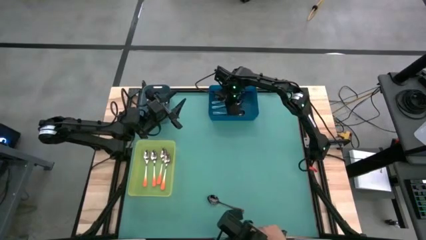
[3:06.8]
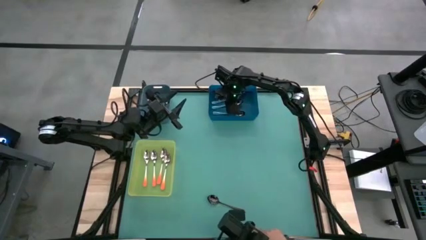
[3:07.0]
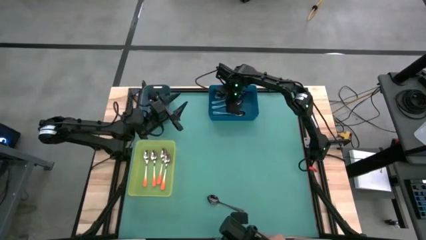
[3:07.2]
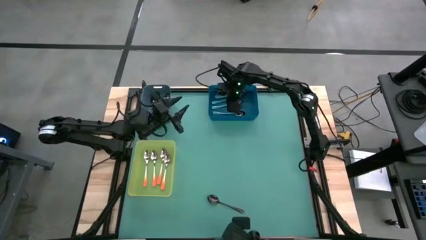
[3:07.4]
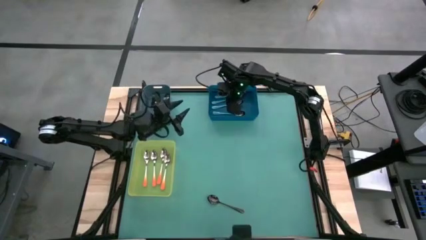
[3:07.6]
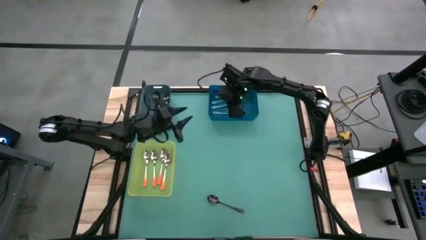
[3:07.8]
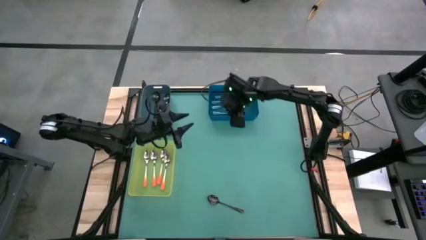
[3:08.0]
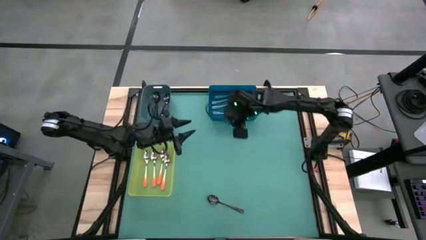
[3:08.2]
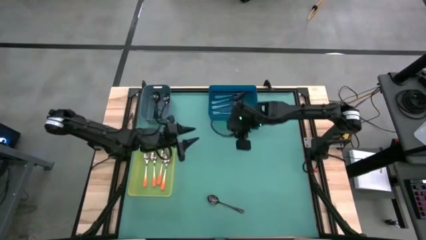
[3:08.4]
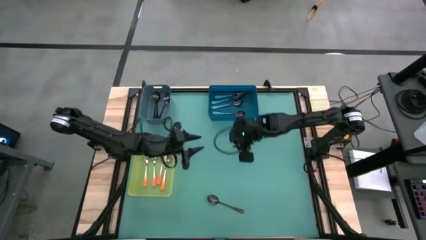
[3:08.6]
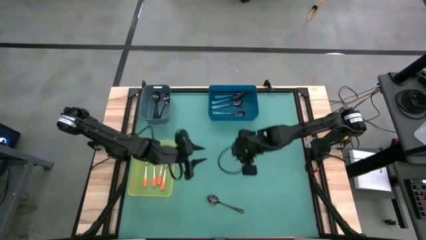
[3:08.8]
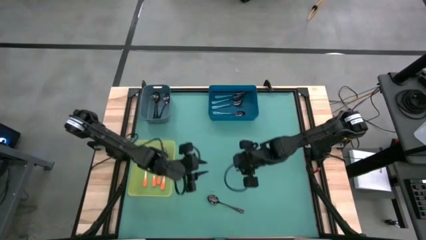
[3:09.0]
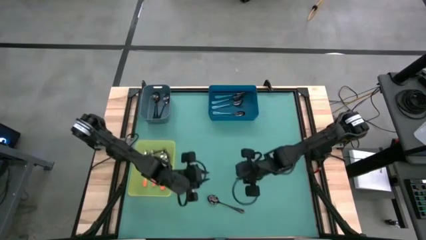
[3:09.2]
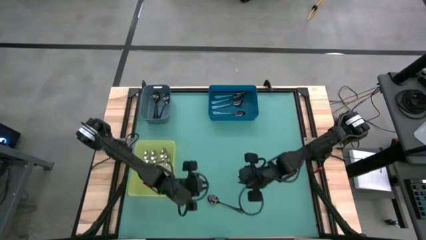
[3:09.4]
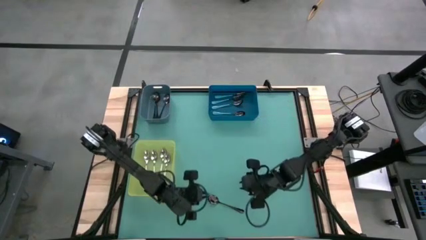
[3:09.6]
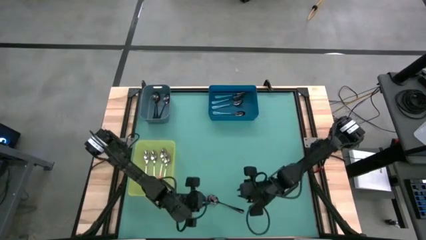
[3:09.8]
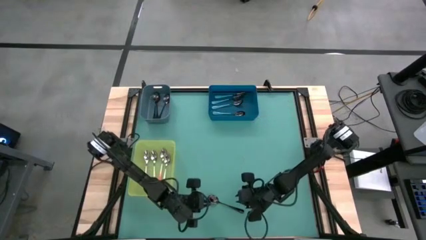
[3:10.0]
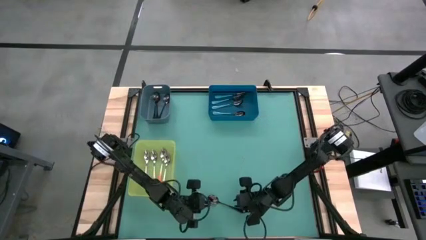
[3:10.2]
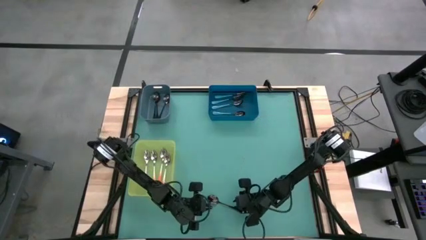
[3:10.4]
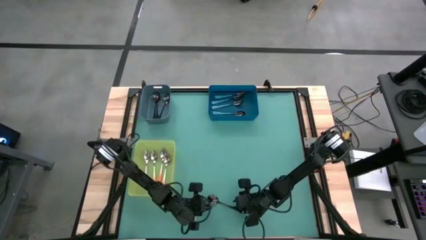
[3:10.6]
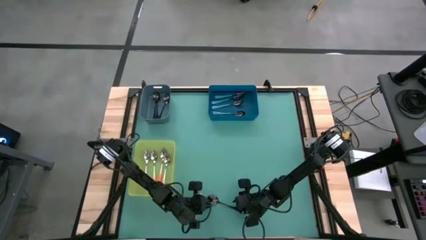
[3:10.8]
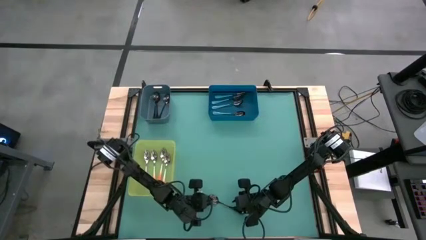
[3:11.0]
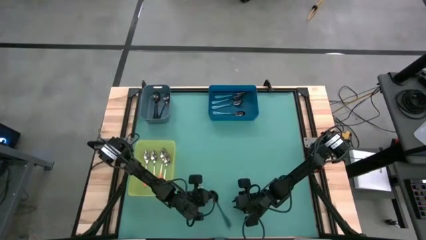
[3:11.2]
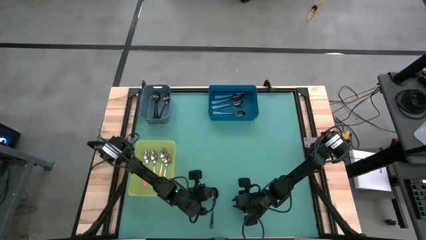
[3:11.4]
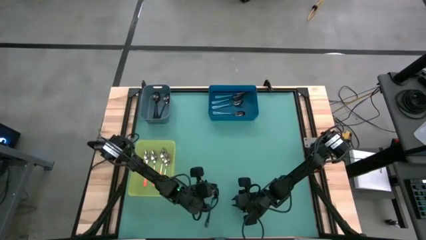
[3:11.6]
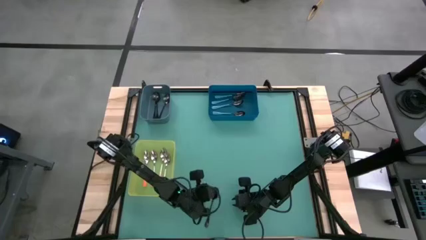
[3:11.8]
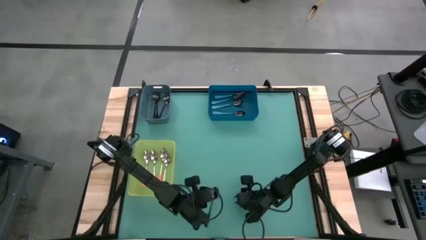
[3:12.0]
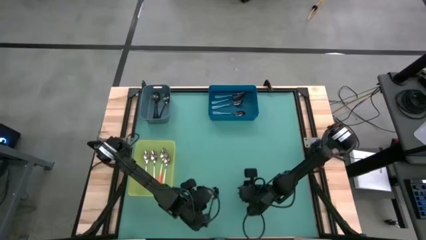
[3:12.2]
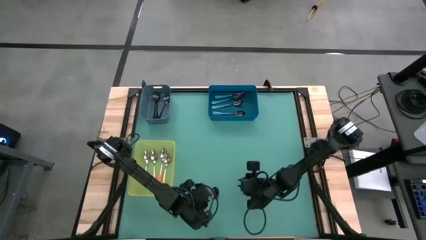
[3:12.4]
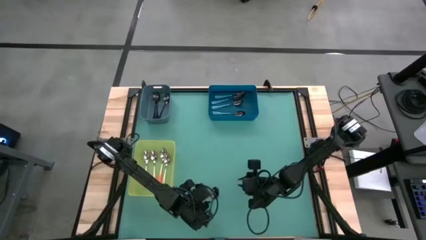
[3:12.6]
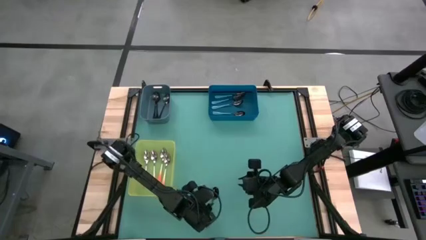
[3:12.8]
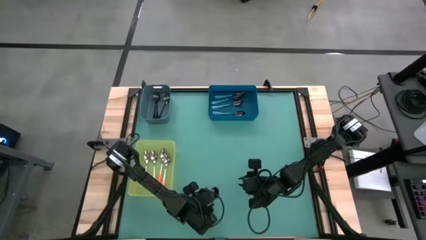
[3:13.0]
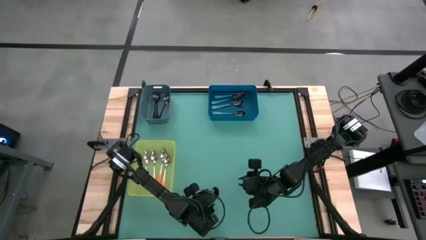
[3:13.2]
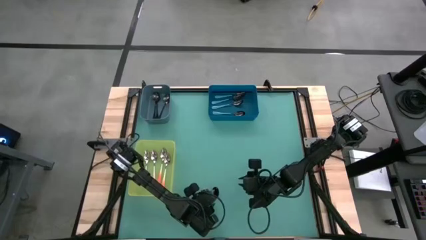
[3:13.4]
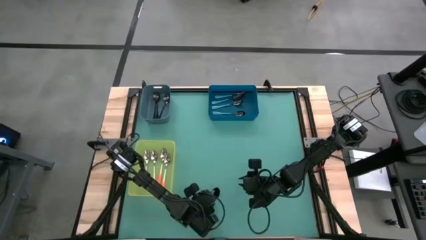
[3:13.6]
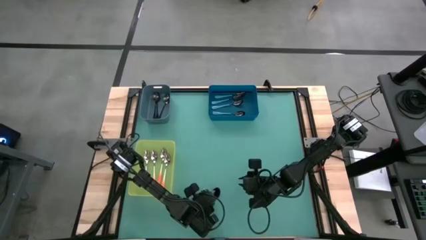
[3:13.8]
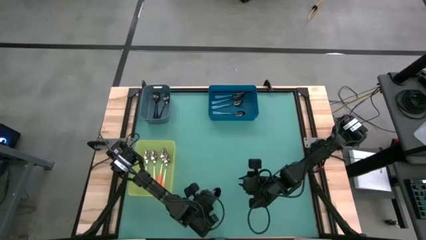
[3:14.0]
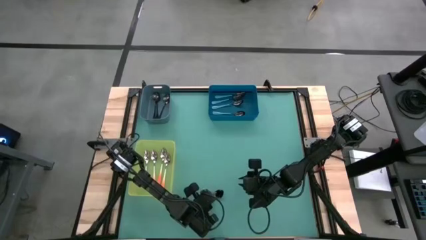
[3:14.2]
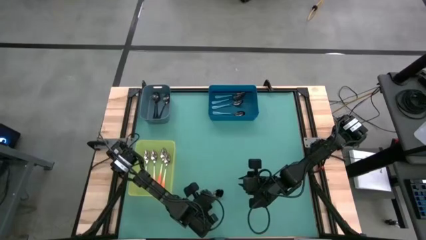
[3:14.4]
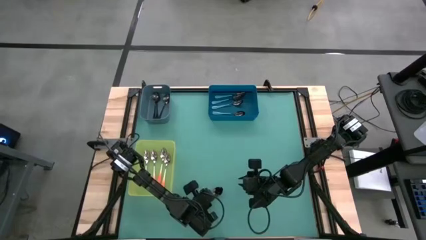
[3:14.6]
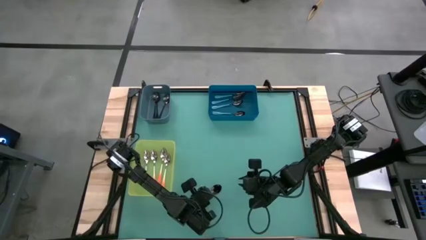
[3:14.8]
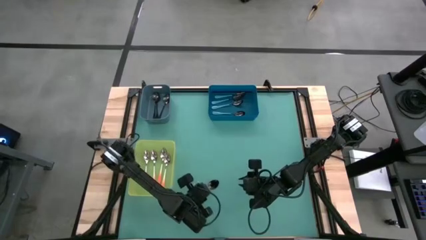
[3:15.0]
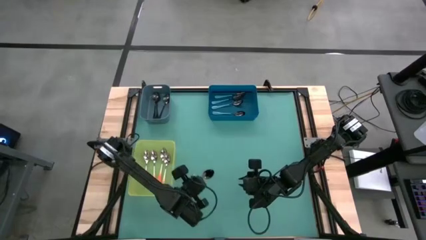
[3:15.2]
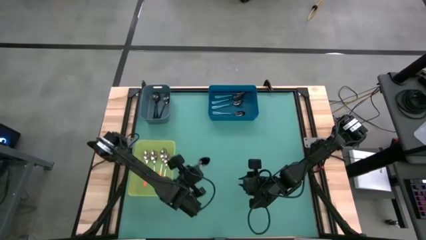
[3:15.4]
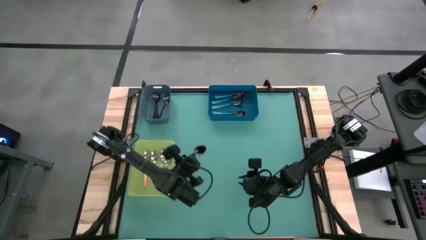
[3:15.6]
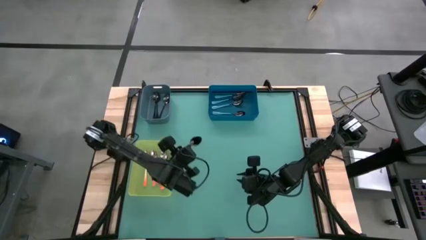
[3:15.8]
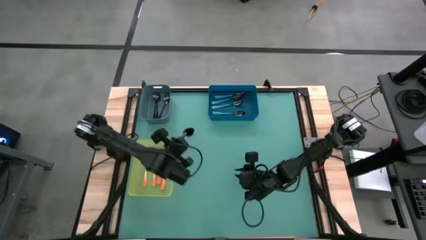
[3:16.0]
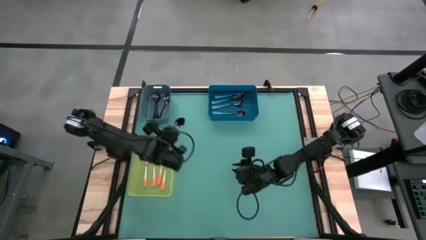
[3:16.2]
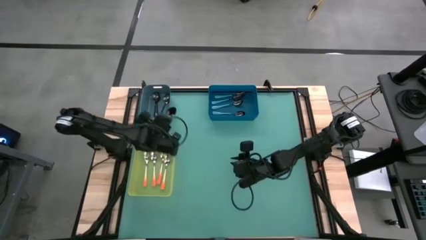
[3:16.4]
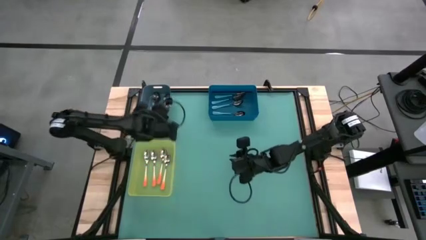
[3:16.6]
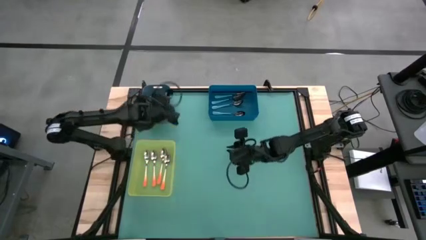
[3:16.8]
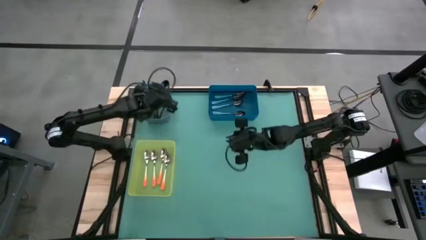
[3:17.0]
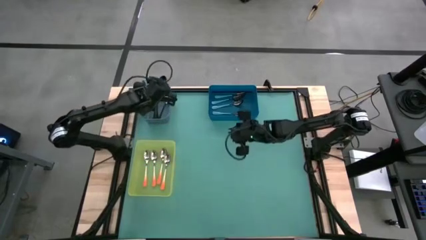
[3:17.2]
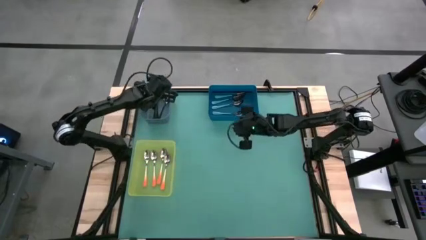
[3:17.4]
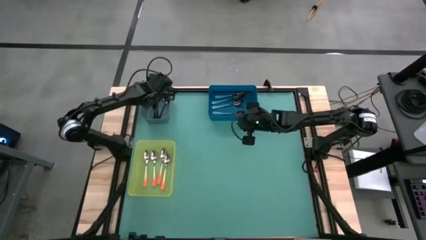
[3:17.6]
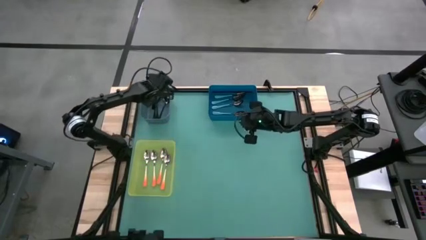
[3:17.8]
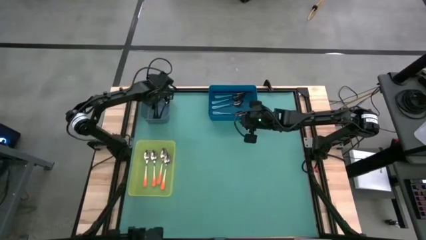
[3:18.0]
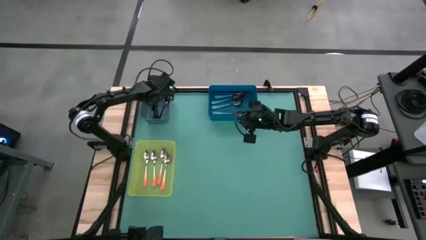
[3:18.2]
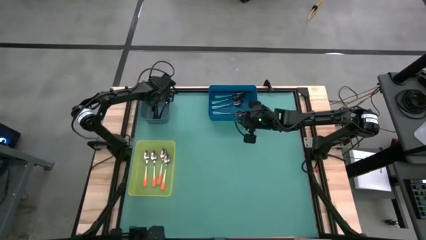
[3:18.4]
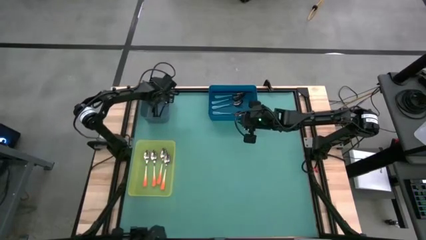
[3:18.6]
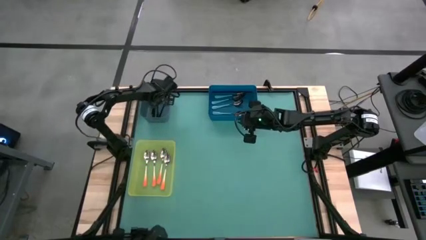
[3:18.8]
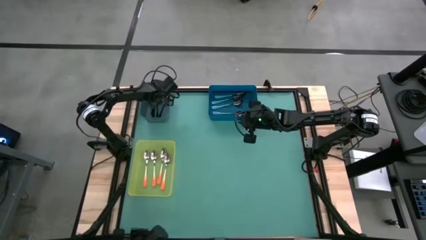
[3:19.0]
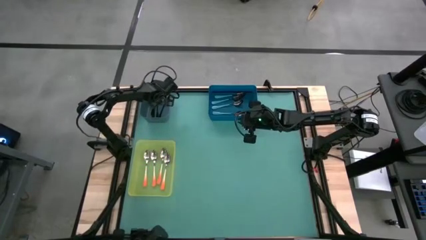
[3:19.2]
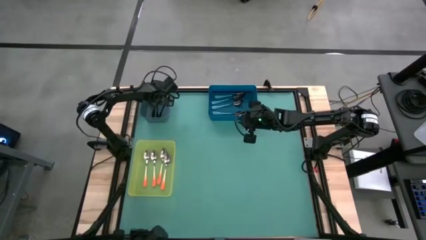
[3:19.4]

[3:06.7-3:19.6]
Task: Sort silverware by color (type)
Put the black spoon into the blue bin
